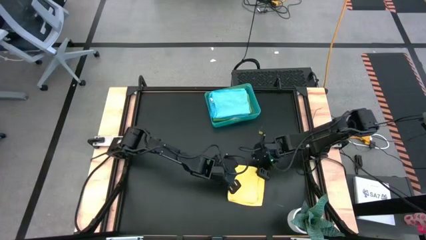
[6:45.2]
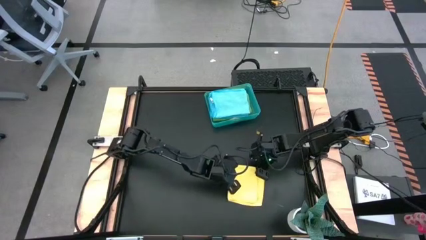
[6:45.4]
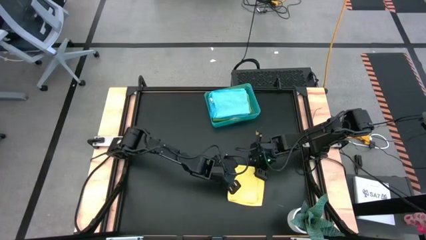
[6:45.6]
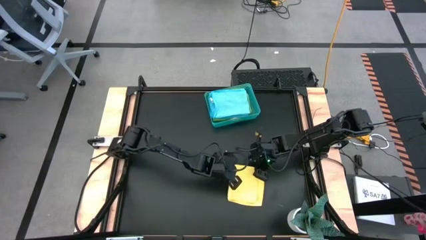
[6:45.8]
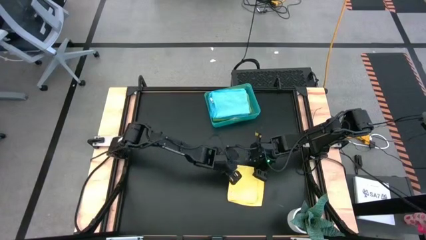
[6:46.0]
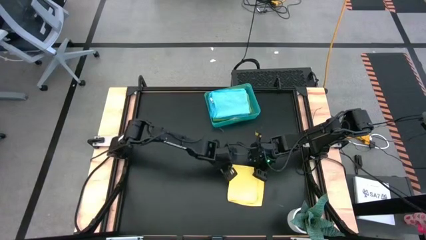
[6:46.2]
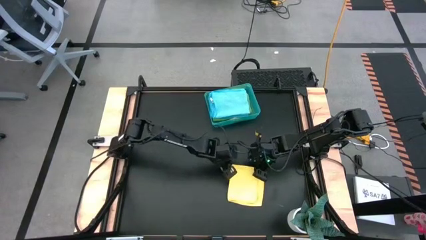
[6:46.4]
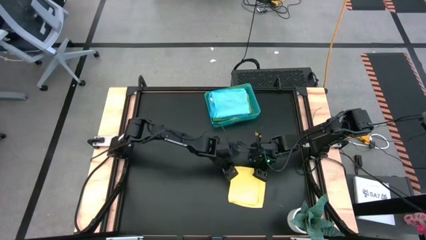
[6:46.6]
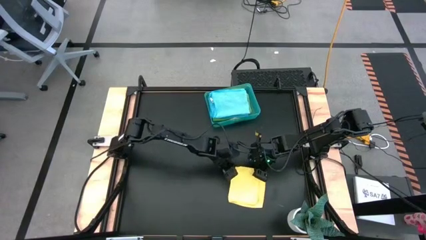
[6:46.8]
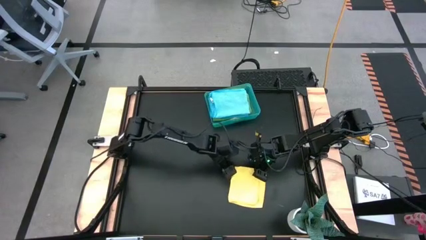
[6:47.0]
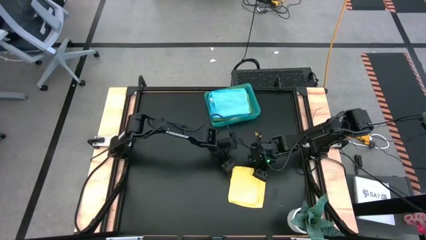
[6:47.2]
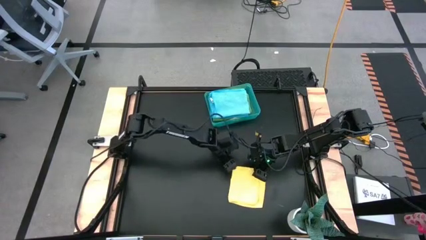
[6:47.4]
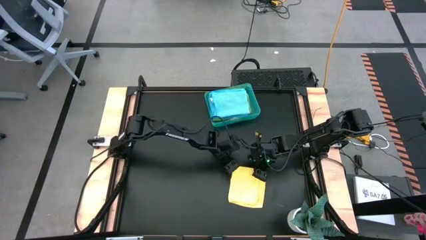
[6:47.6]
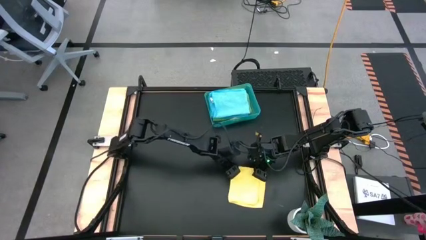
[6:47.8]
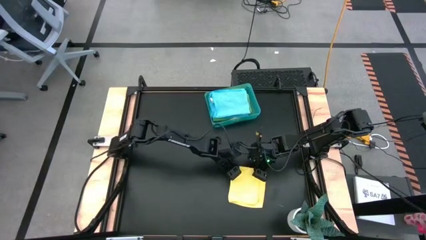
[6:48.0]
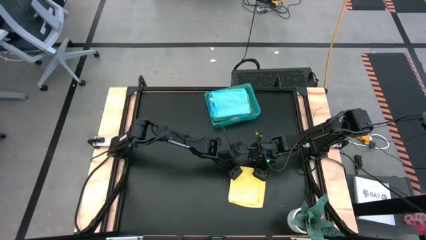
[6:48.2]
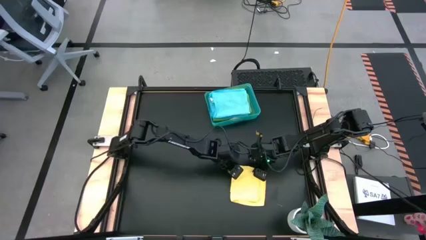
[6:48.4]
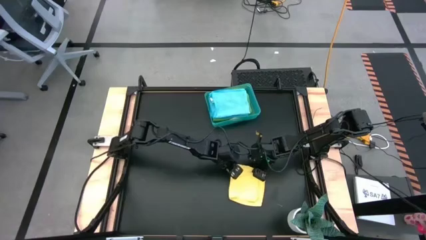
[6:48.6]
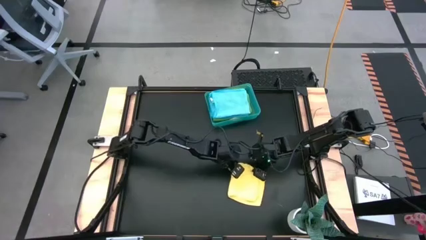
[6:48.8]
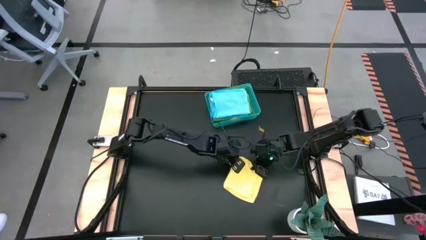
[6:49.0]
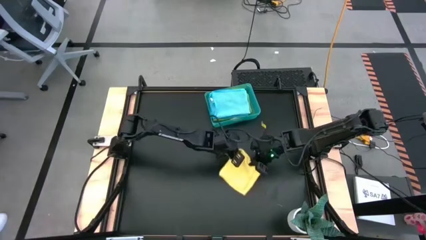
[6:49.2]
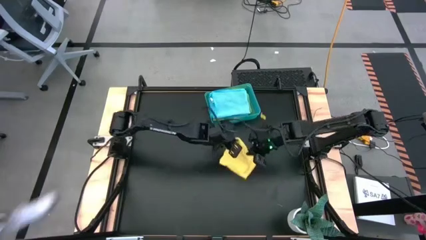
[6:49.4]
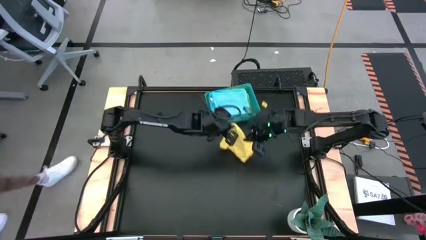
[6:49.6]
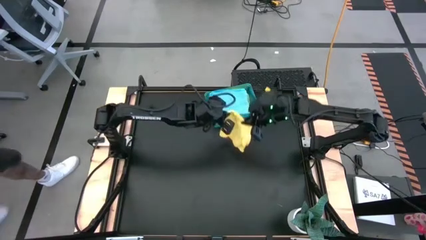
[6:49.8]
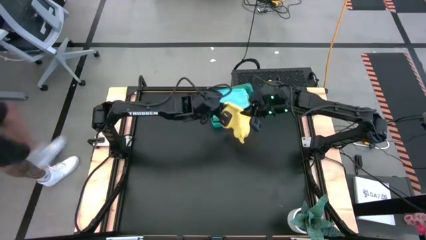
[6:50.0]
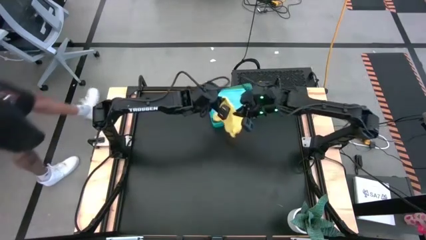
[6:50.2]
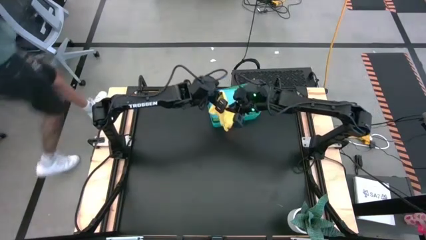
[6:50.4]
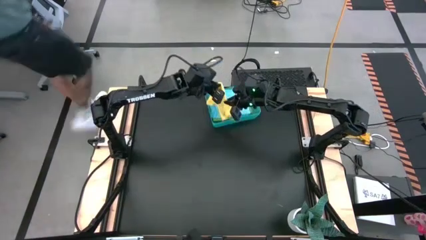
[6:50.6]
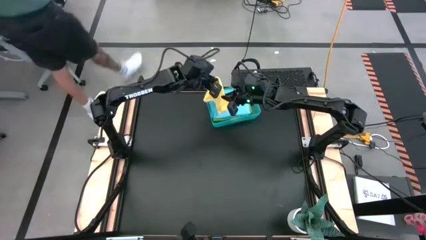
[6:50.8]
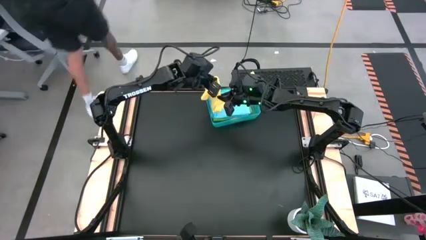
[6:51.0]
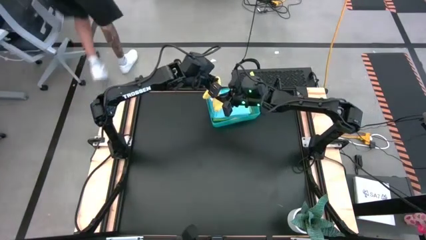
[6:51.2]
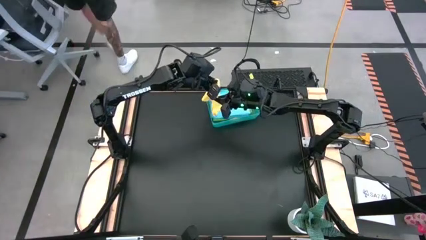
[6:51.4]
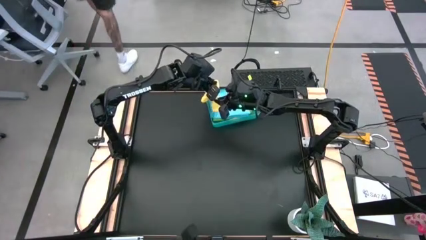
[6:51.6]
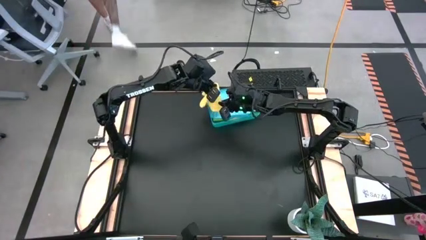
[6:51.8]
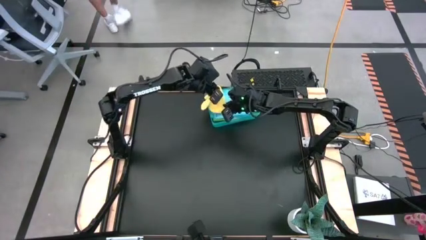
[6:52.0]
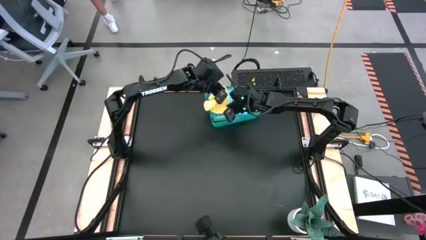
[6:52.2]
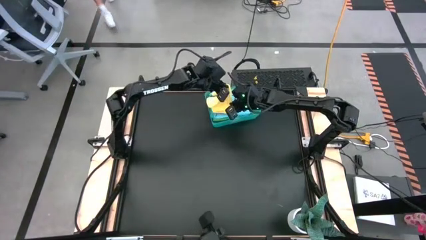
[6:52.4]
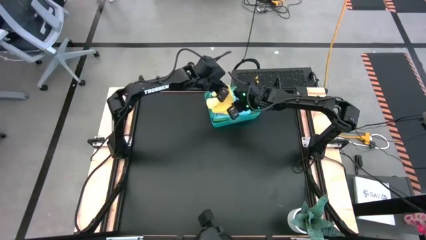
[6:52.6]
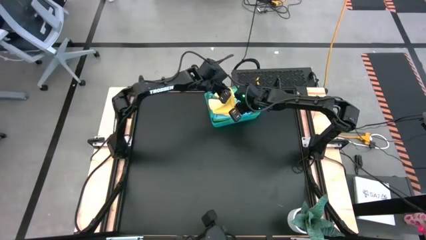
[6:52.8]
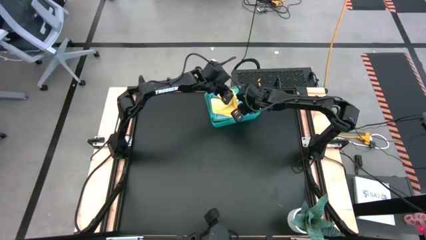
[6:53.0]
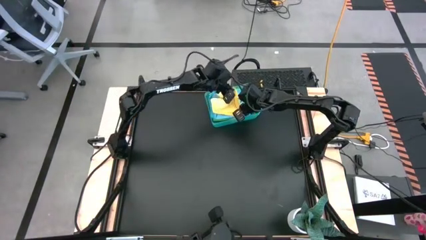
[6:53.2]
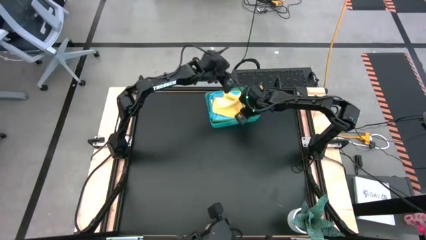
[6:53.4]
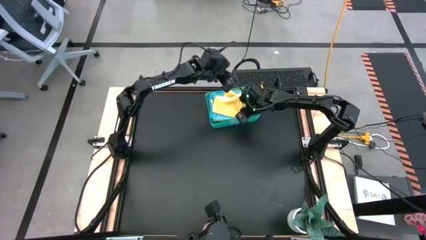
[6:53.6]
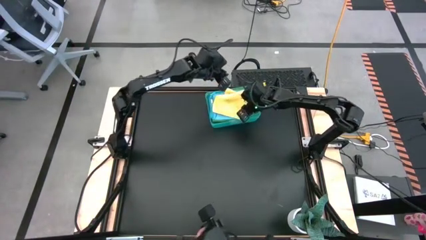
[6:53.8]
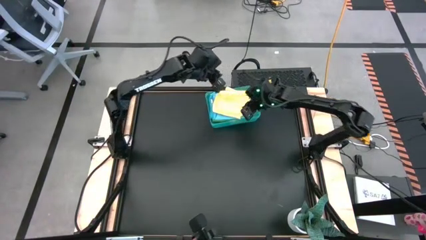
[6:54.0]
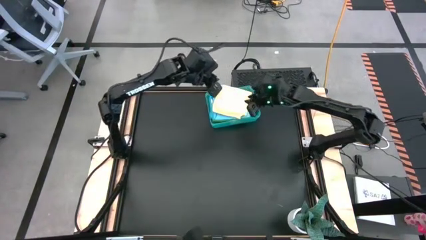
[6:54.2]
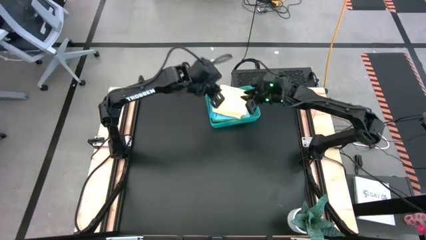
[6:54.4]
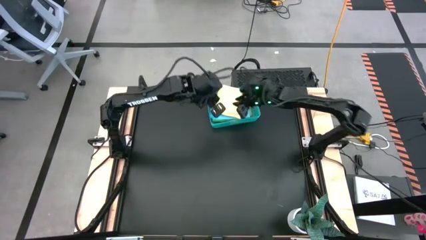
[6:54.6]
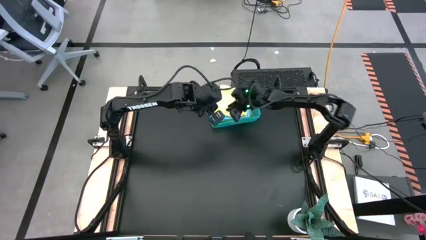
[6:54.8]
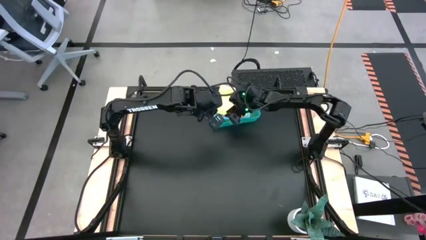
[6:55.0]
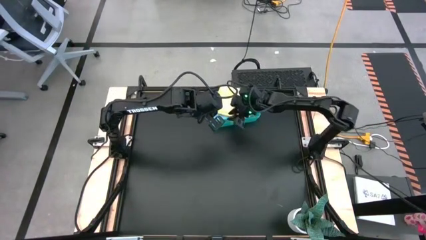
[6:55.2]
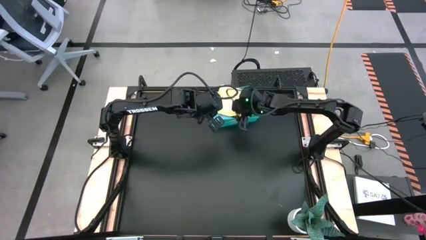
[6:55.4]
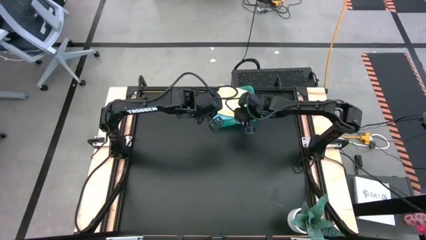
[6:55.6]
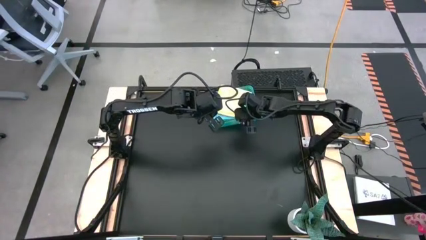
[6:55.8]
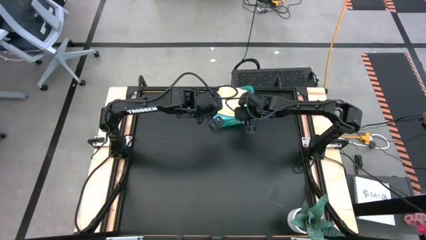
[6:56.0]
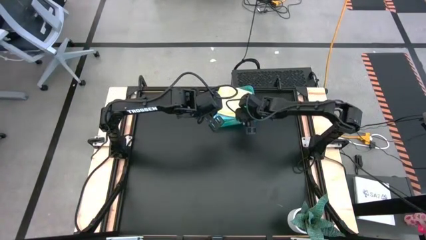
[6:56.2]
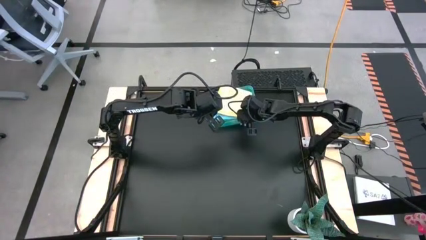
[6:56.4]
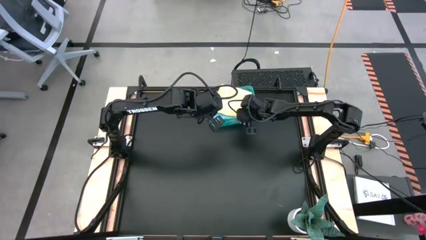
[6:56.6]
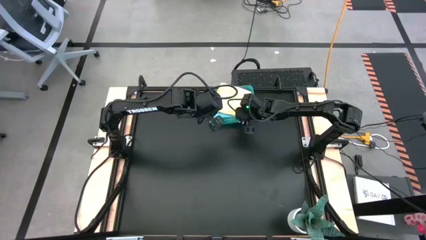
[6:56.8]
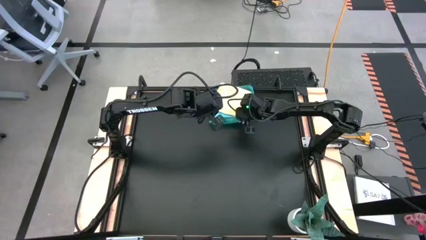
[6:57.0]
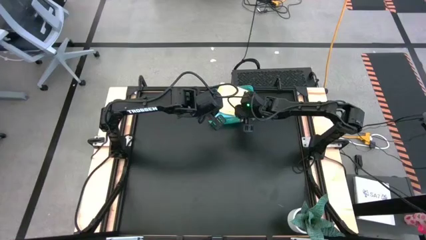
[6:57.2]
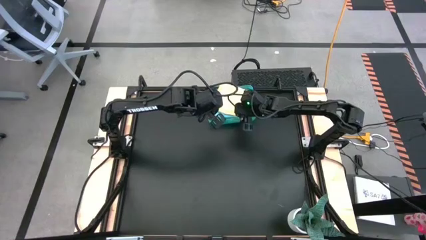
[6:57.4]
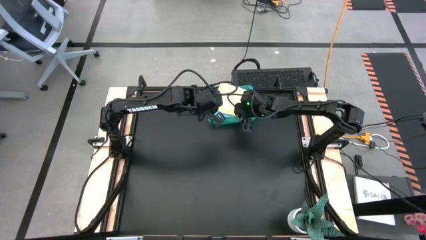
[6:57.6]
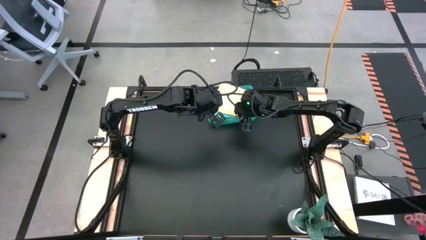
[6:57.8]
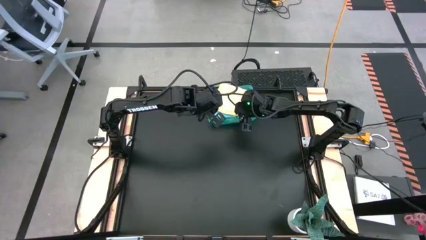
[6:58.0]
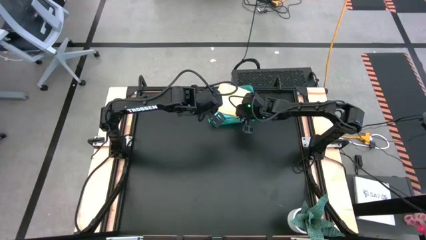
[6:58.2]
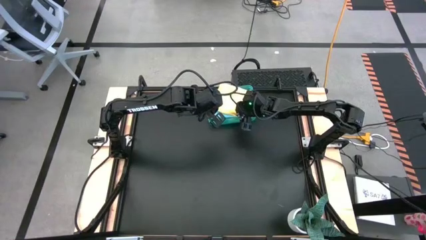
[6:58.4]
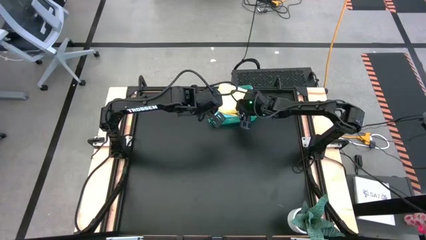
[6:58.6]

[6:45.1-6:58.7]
Task: Fold microfiber towels
Put the yellow microfiber towel into the blue bin
